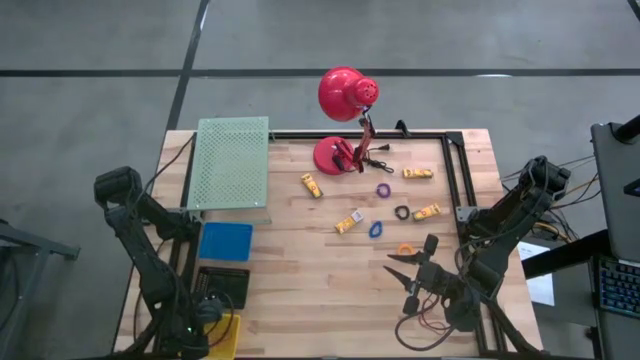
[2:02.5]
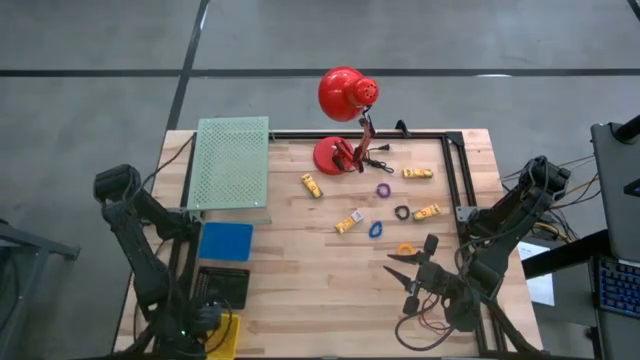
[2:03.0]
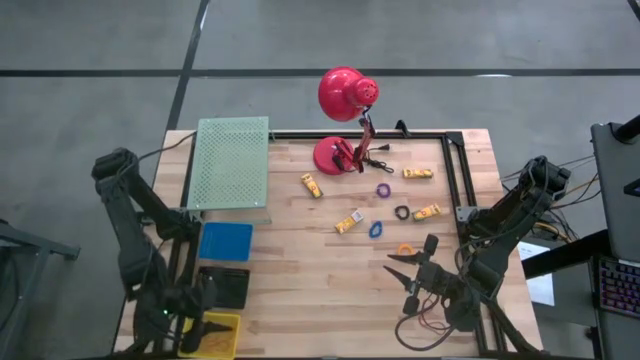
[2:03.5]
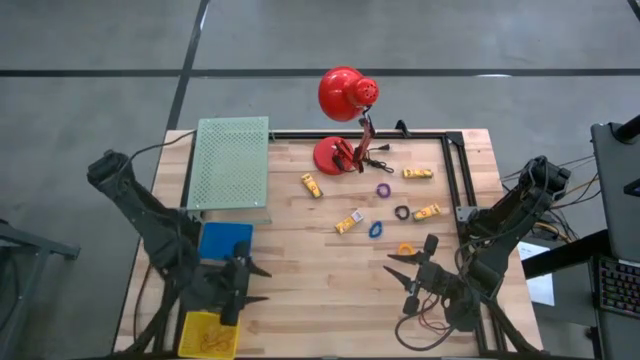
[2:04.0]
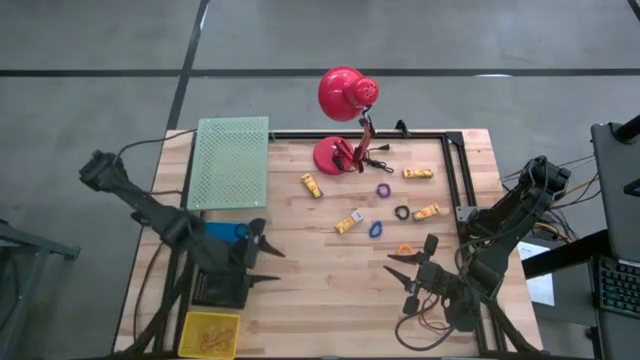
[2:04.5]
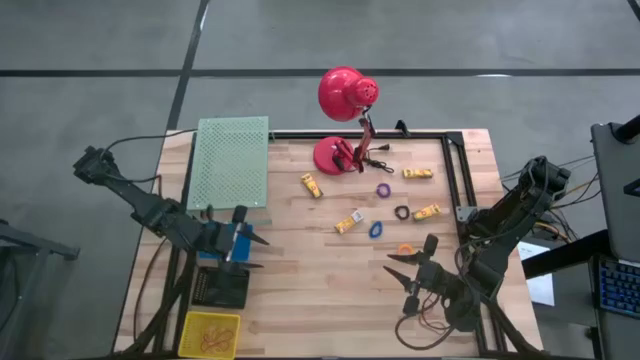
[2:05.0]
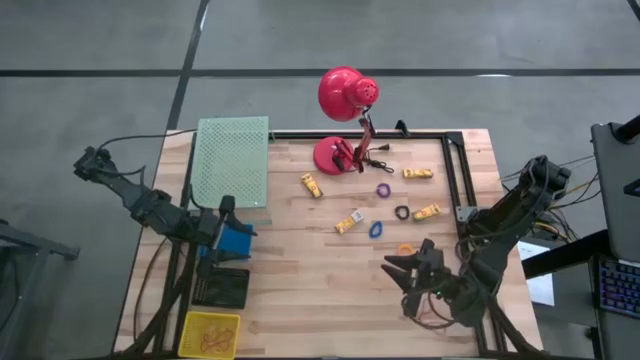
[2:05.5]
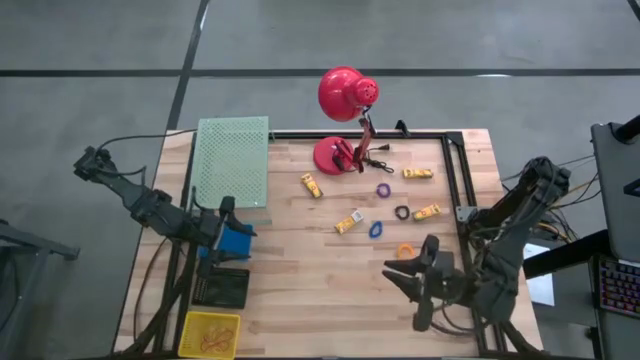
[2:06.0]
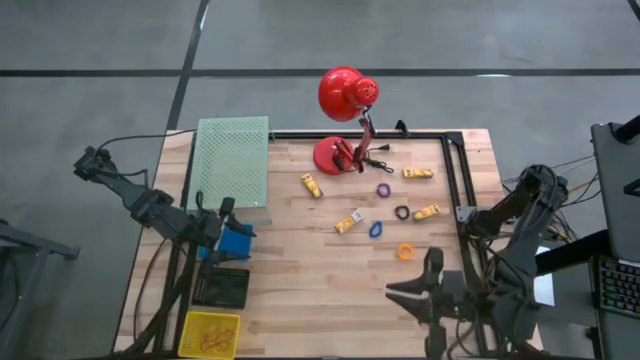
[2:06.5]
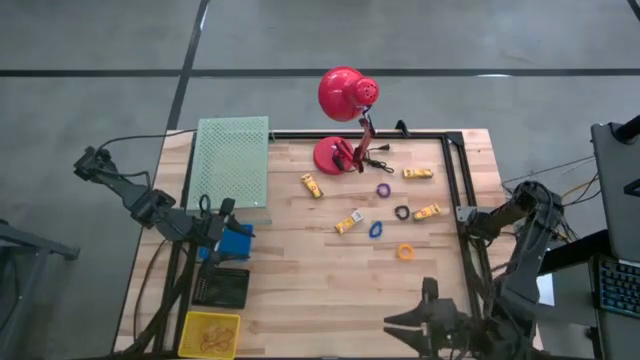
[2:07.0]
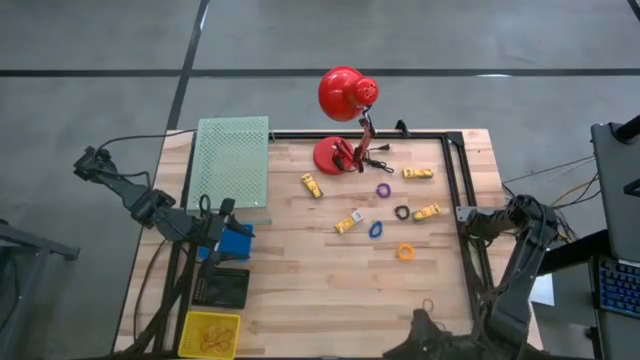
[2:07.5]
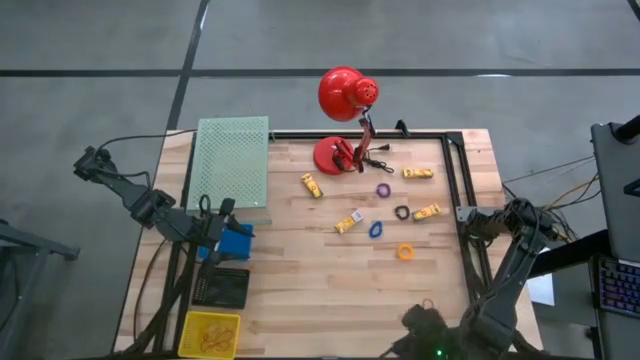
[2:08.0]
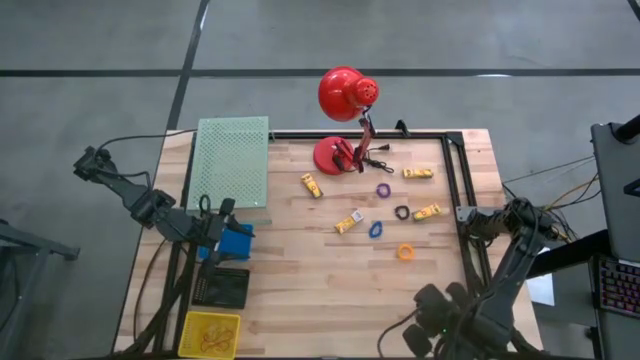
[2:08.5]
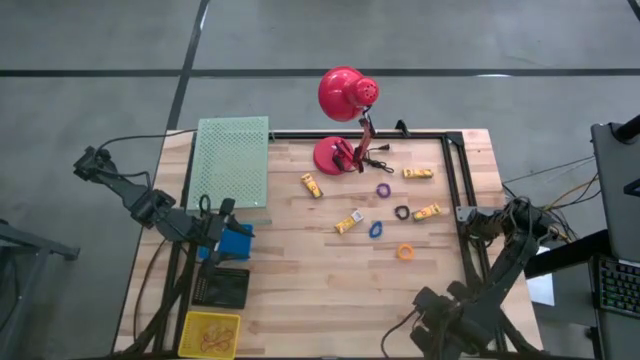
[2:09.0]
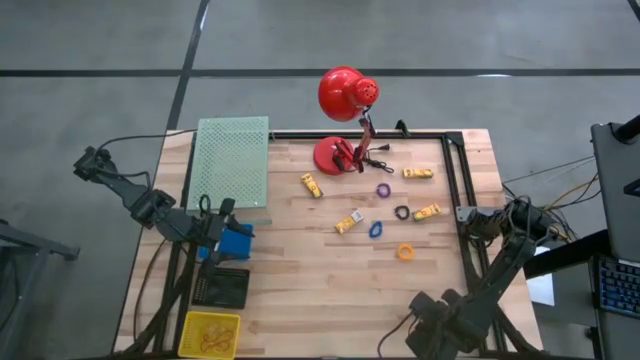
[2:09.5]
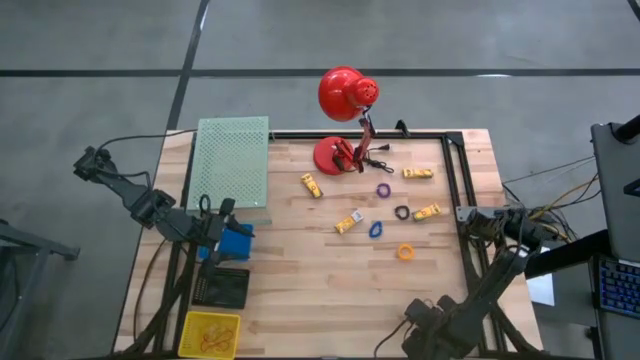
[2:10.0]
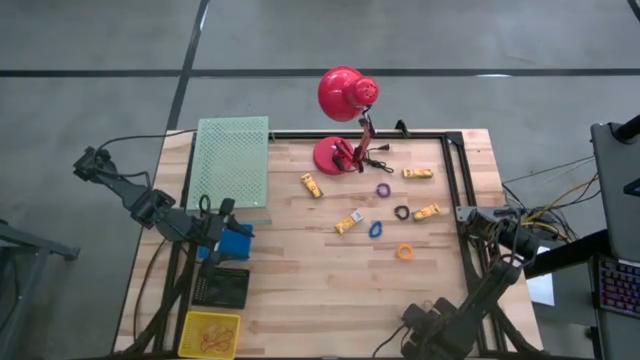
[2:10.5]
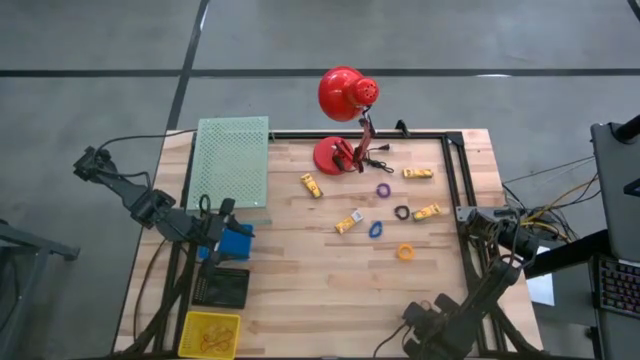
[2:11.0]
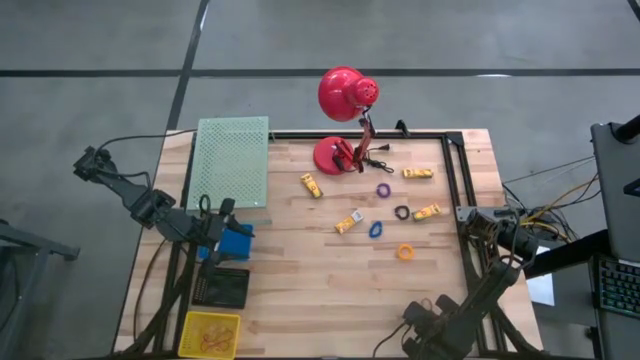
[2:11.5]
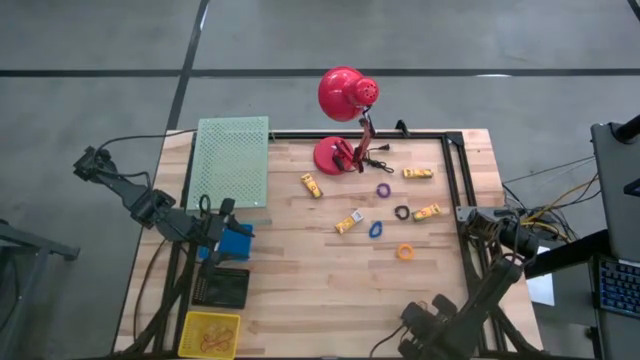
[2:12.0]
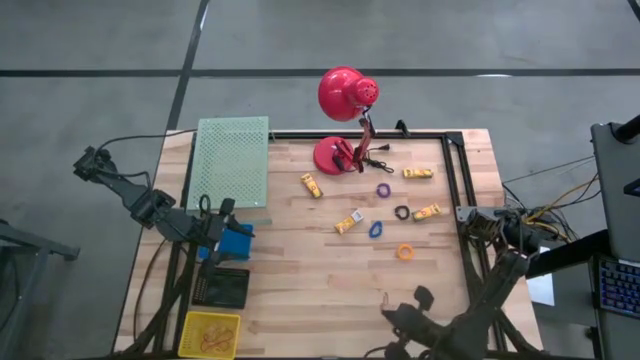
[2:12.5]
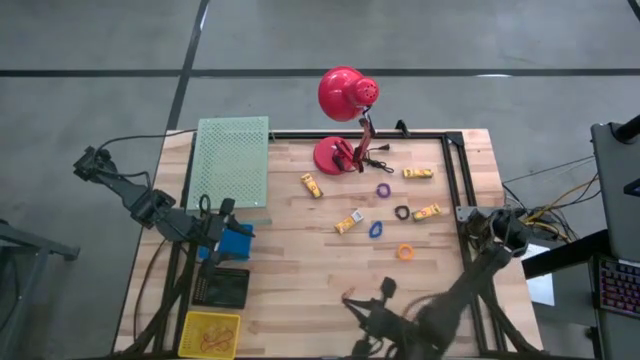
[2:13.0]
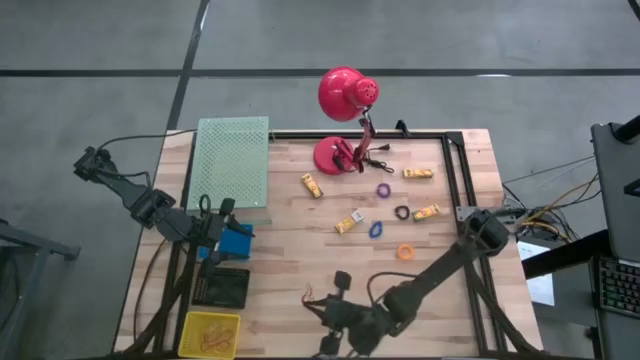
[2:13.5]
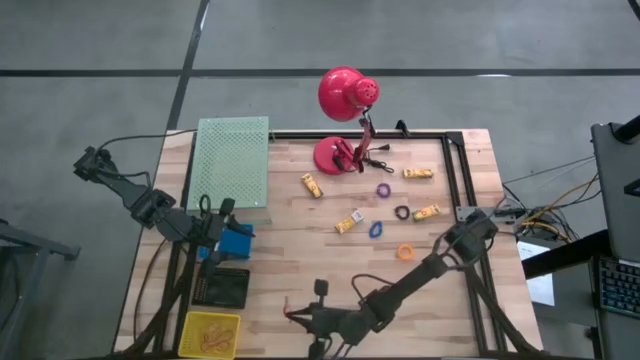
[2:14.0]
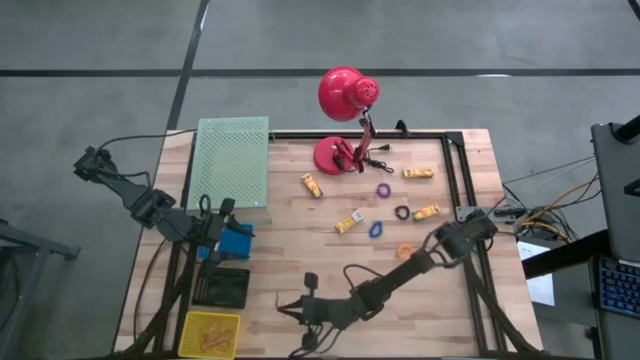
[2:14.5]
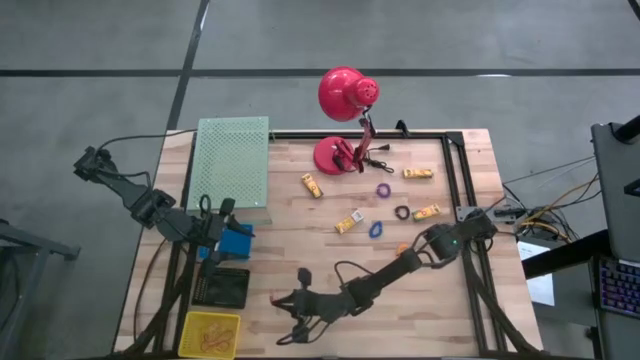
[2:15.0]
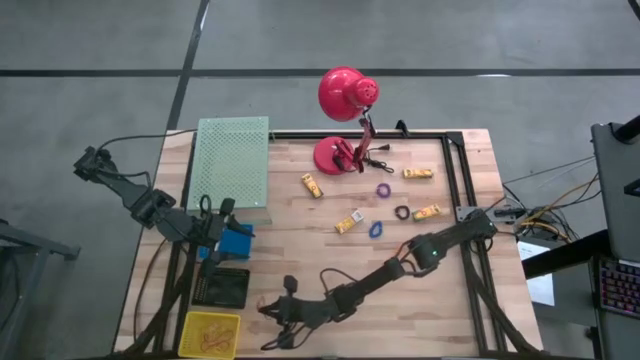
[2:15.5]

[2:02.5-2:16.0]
Task: Pick & Place Office Desk Supplies
Put the red rubber band into the yellow bin

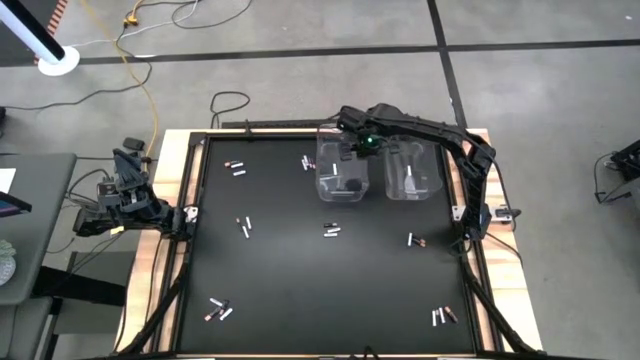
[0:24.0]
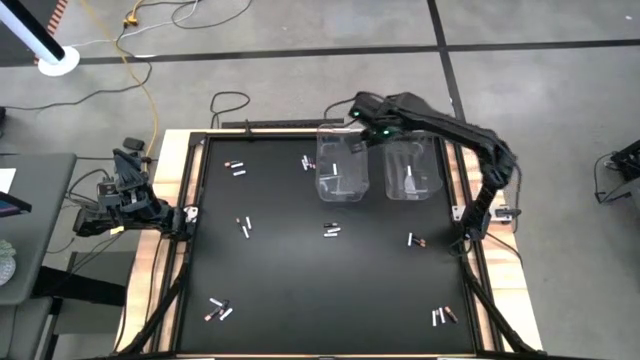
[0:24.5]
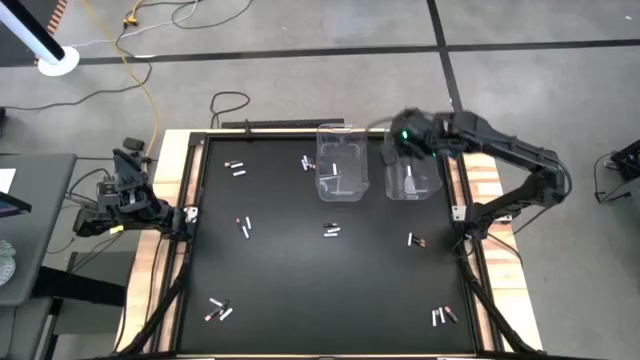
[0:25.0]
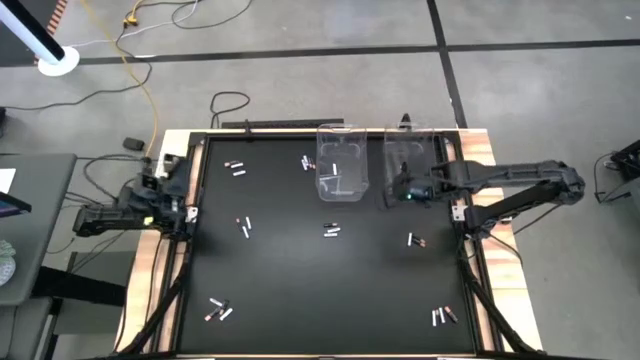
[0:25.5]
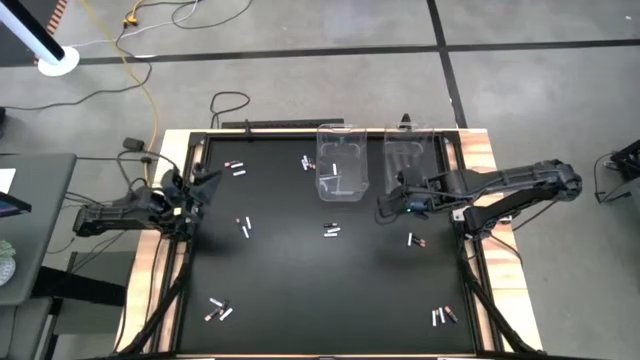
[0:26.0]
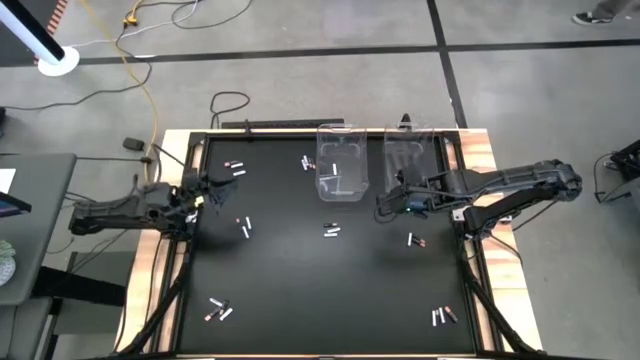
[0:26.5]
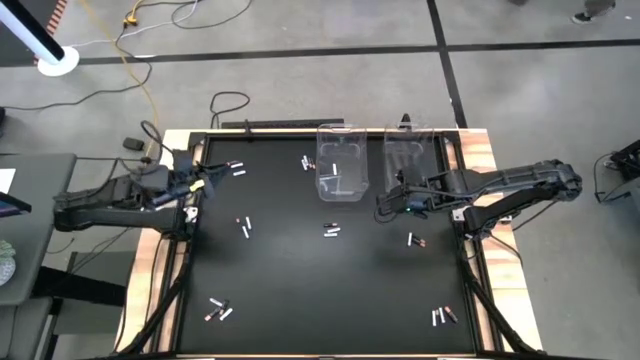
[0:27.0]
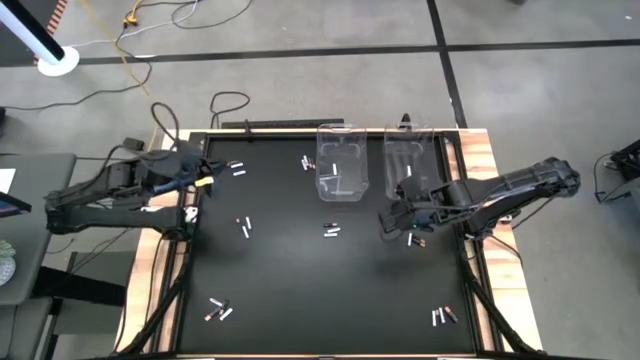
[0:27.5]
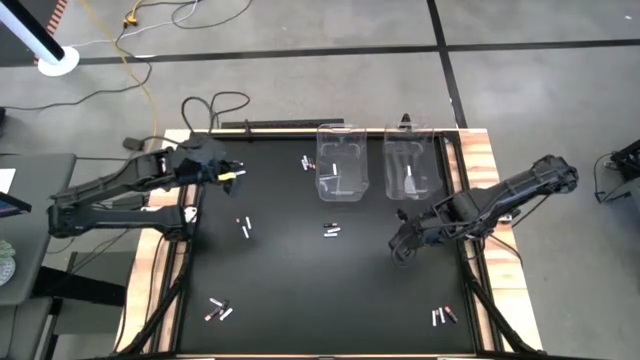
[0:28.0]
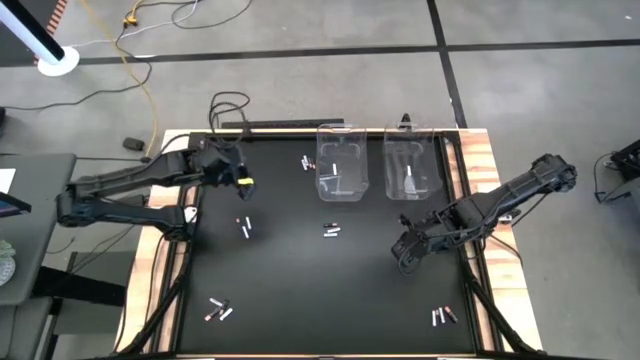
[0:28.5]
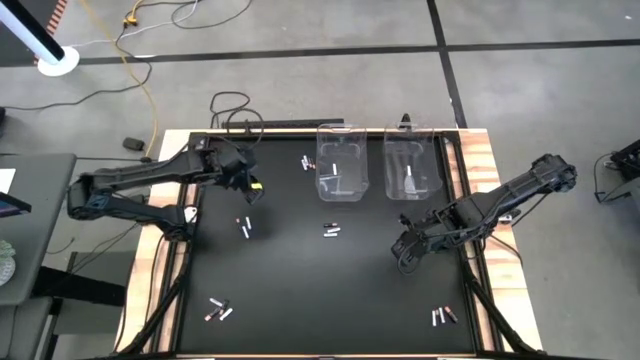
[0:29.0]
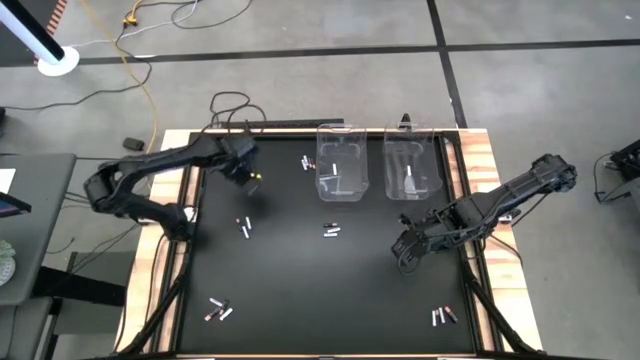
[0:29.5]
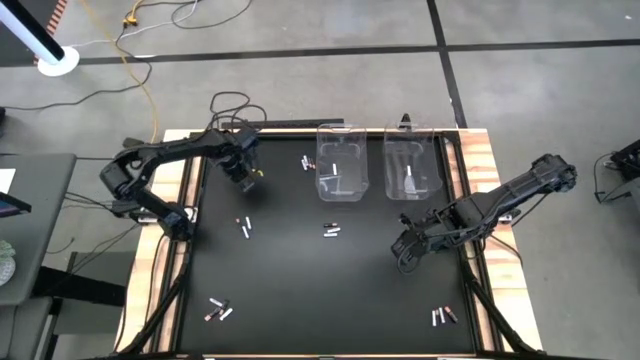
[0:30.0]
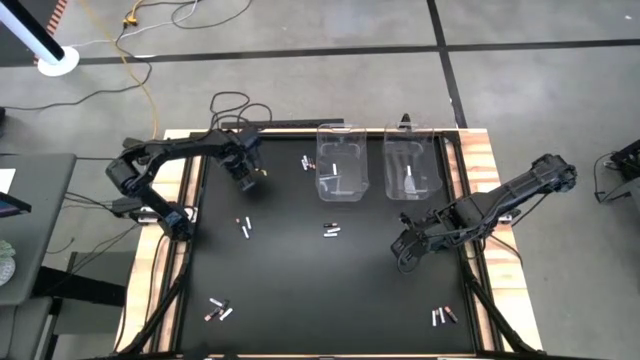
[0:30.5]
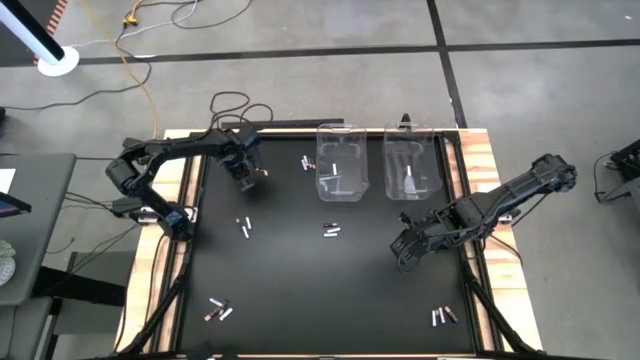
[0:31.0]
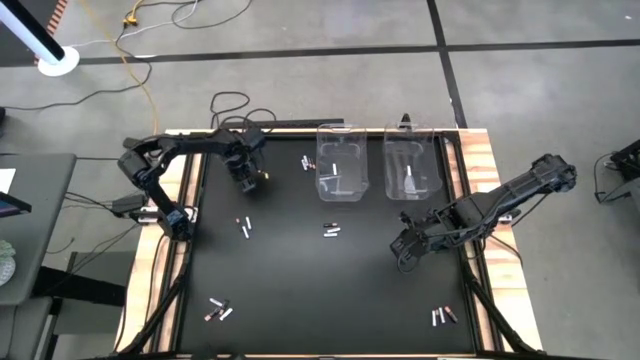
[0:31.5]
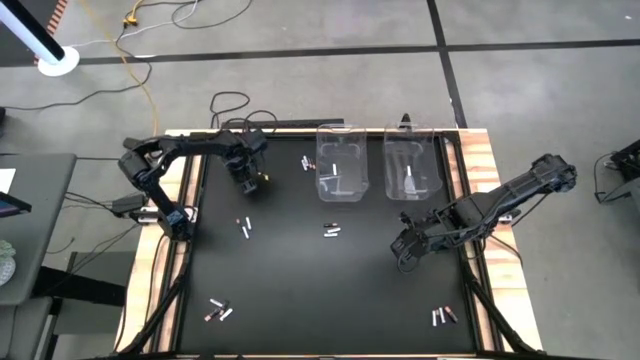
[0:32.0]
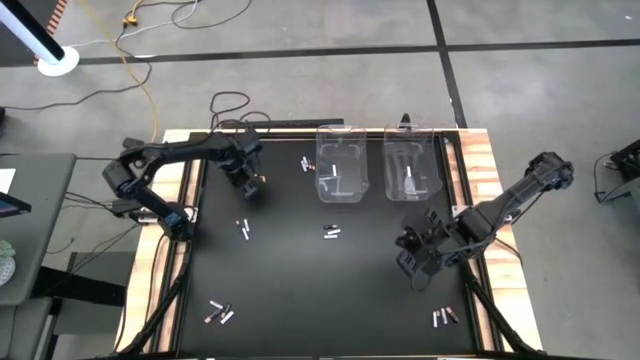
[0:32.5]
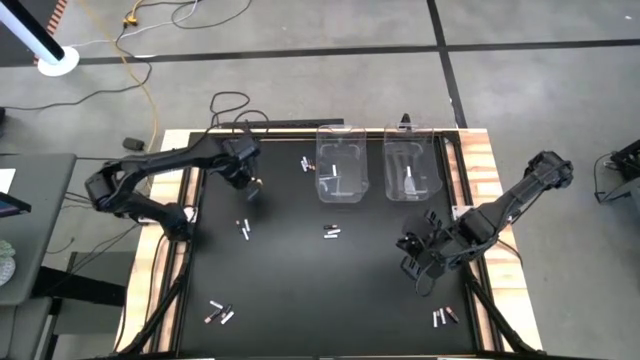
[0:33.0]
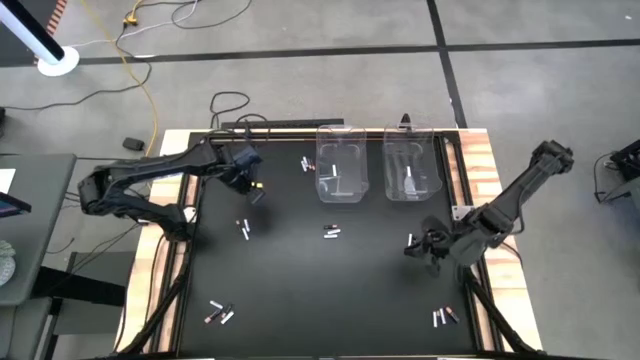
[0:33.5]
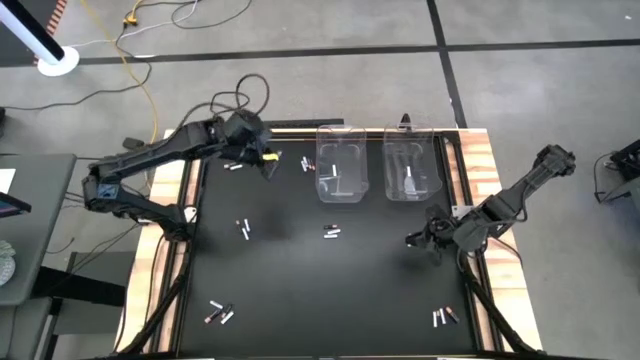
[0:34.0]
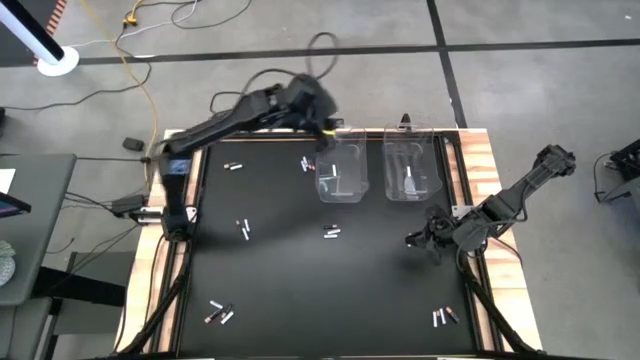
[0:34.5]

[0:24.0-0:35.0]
Task: Sort batteries
Put the white battery into the left transparent bin
